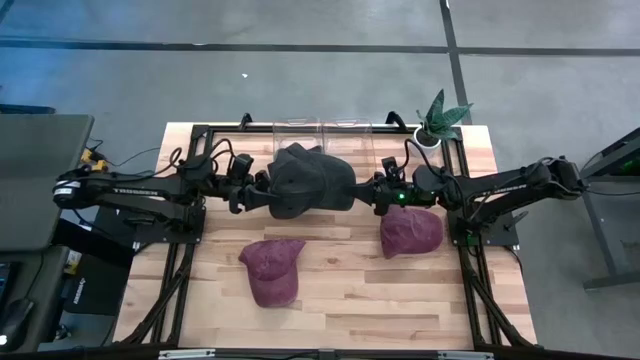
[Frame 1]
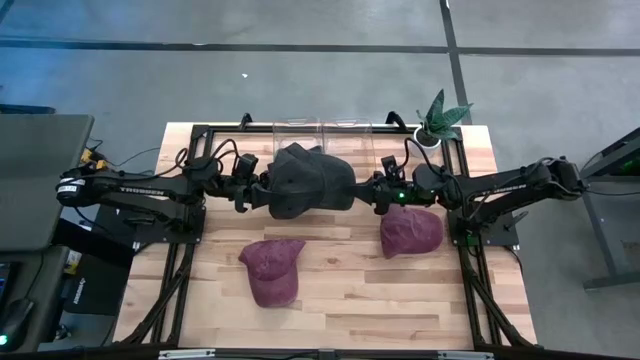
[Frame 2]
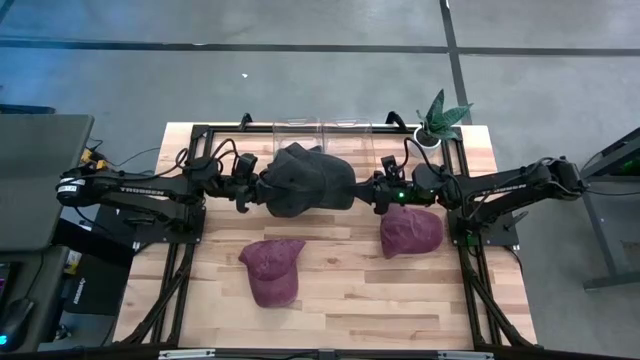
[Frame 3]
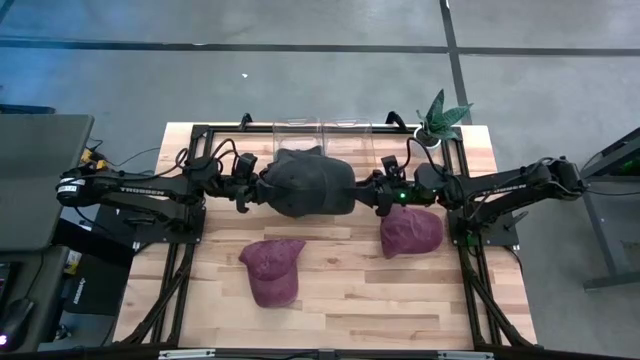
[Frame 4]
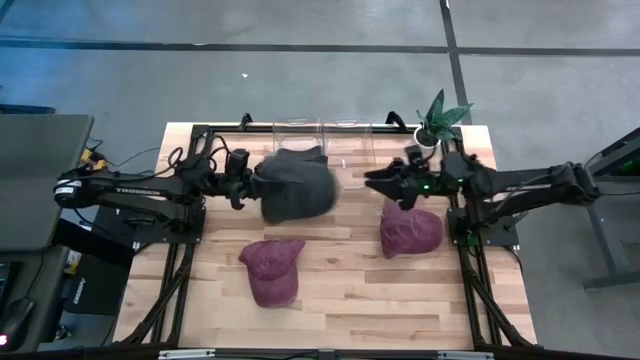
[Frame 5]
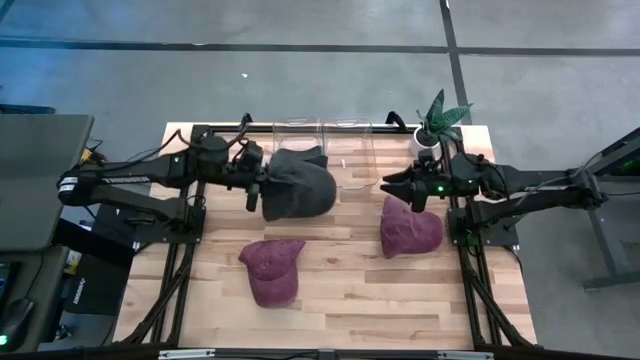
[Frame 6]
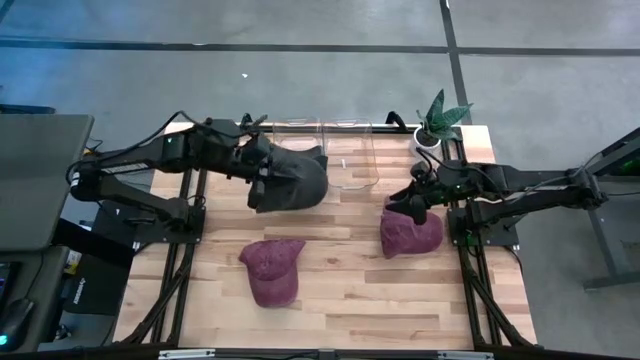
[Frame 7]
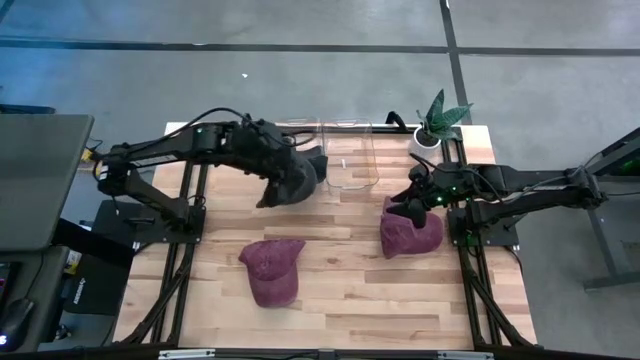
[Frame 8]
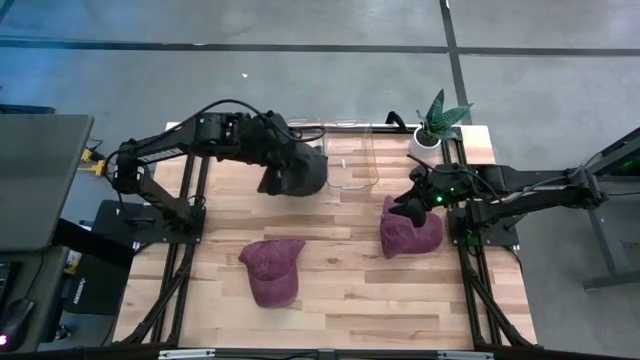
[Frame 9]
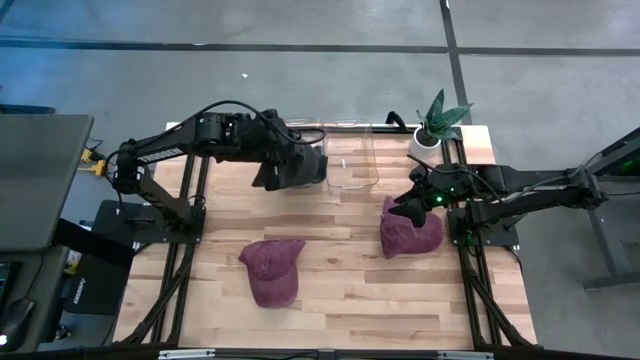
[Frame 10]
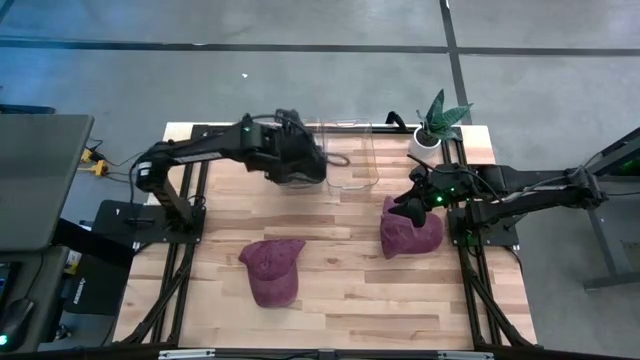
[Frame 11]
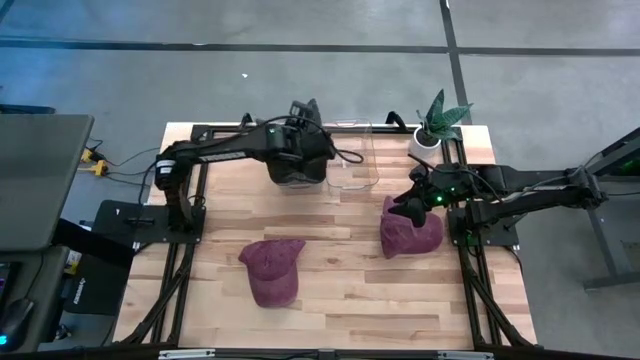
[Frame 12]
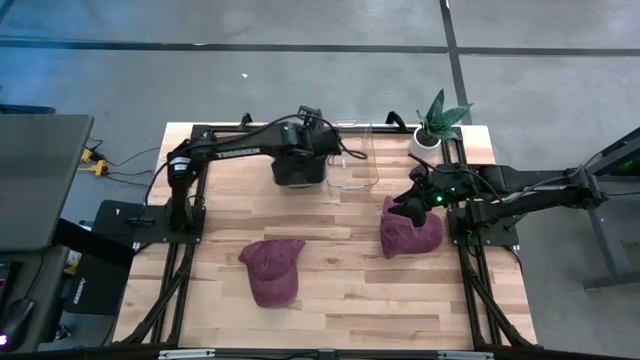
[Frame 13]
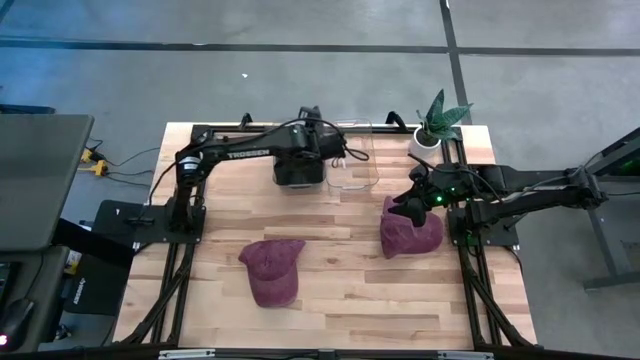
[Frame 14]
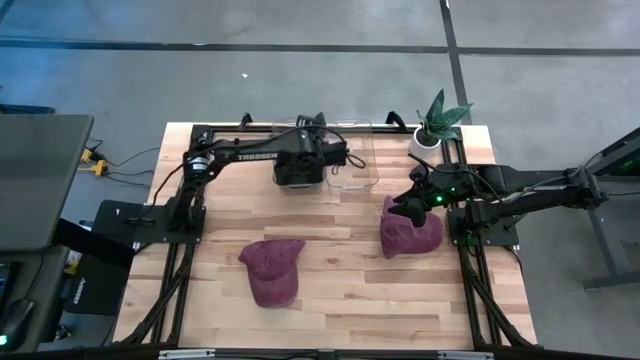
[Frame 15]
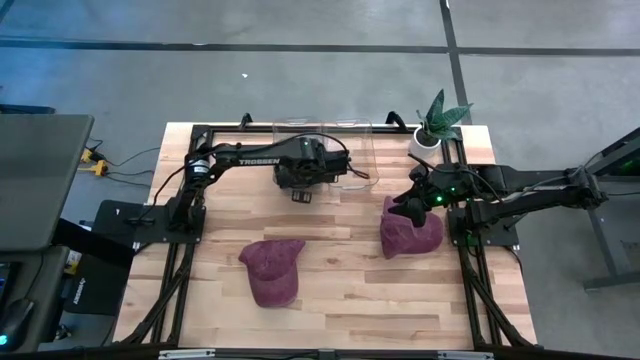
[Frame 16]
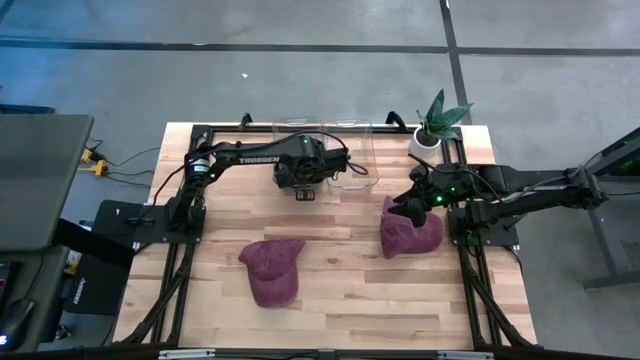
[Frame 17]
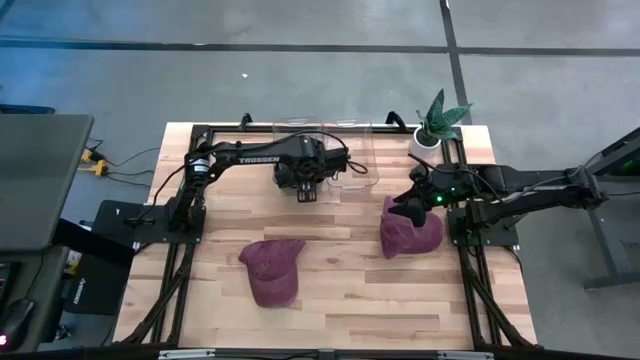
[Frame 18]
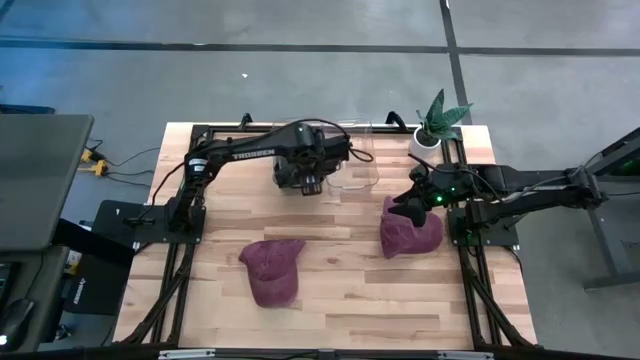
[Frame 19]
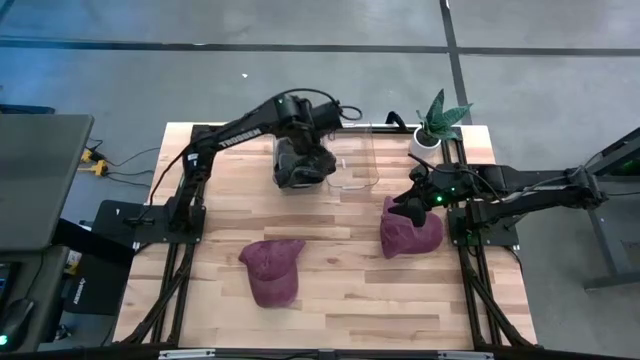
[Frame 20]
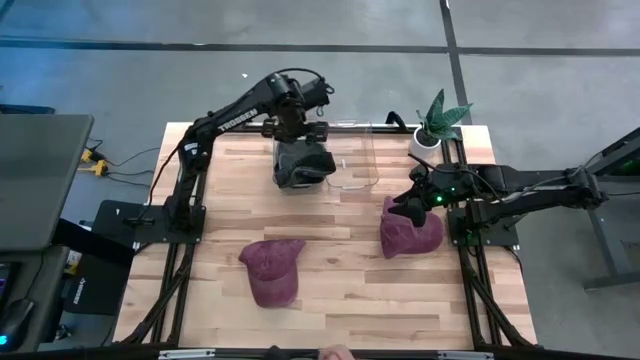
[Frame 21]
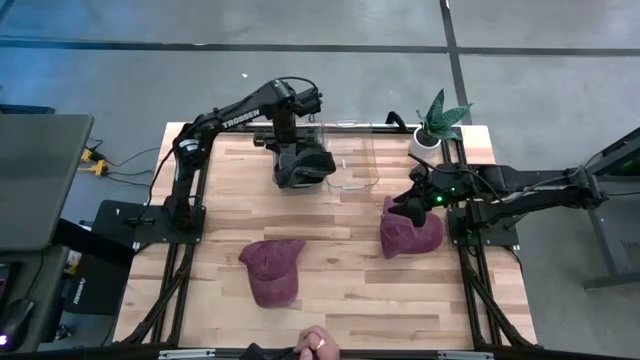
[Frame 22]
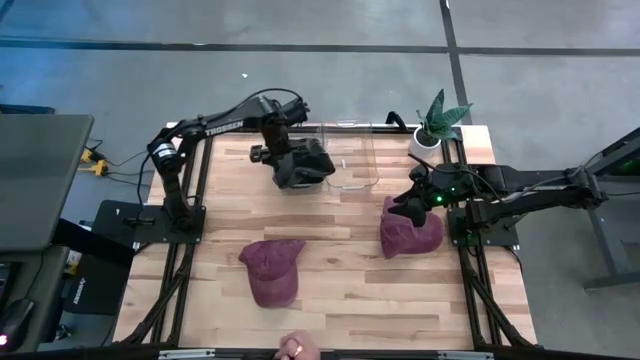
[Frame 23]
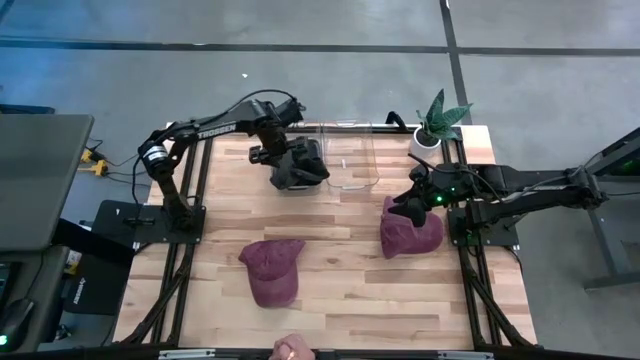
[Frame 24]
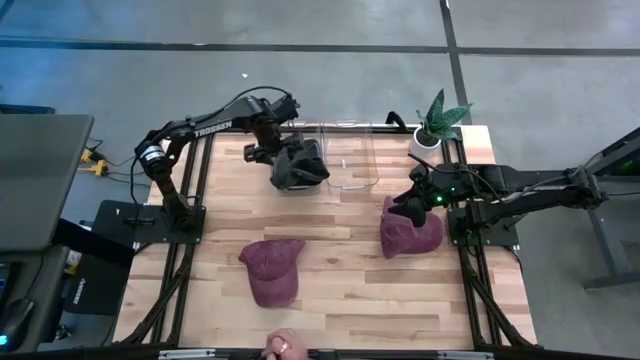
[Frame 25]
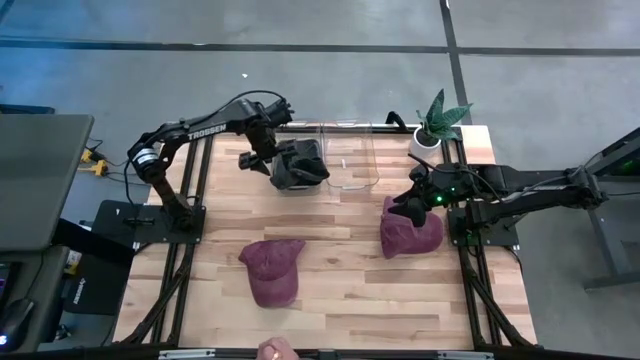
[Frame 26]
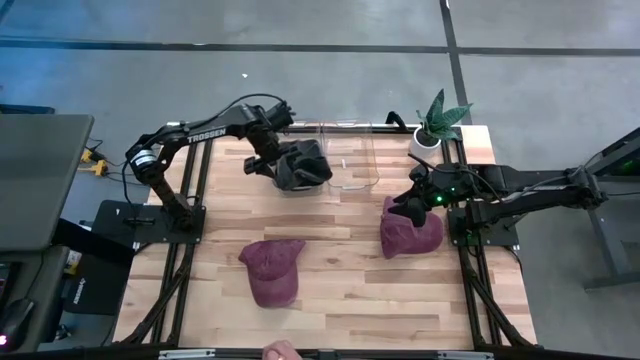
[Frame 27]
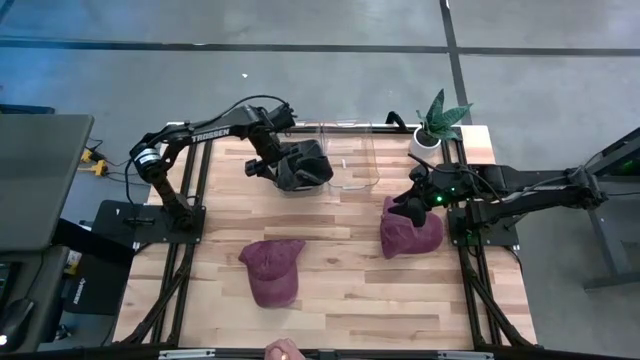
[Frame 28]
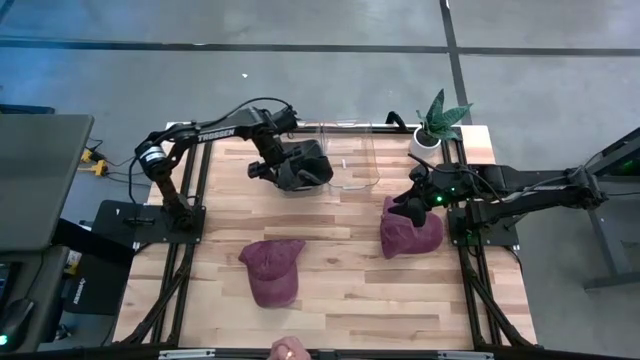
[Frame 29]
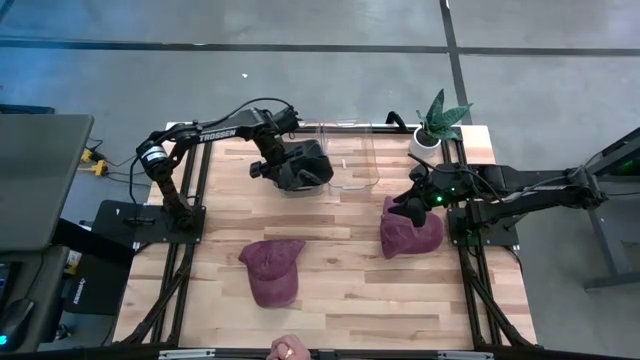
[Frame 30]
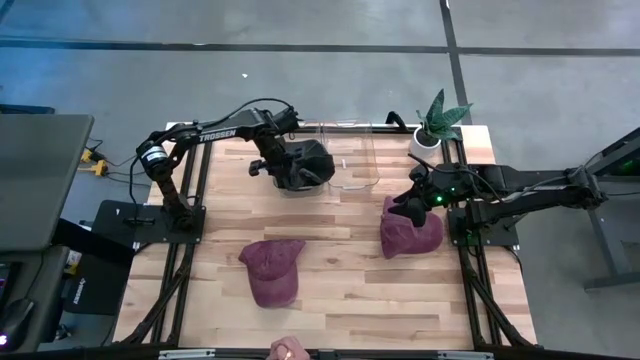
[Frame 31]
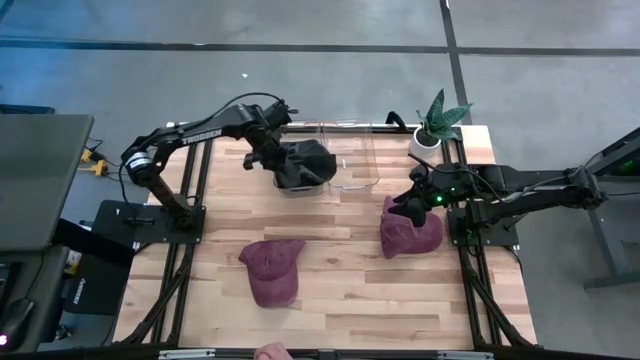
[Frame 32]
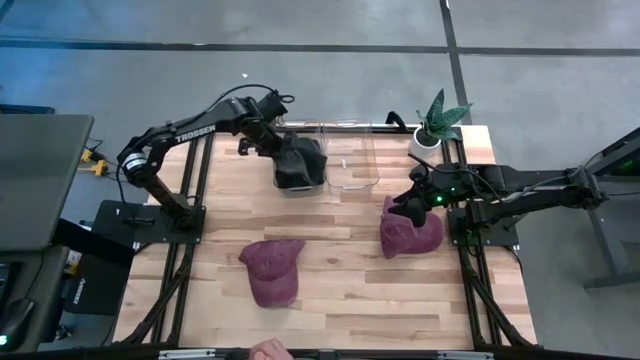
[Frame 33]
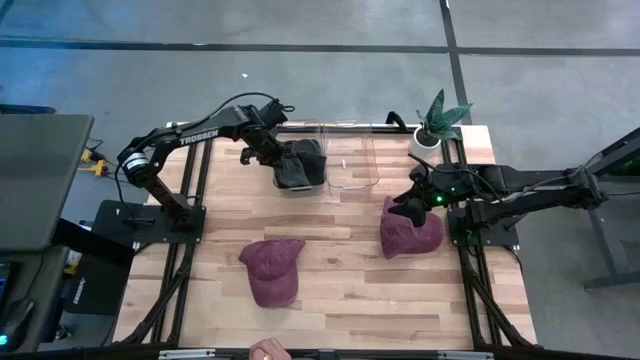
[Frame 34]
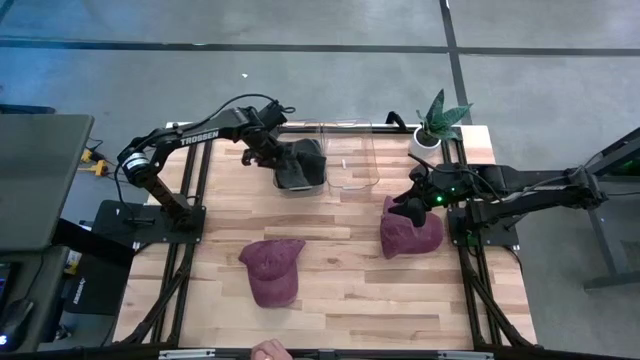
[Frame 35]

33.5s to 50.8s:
Task: Pick & Place hat
Put the black cap into the left transparent bin

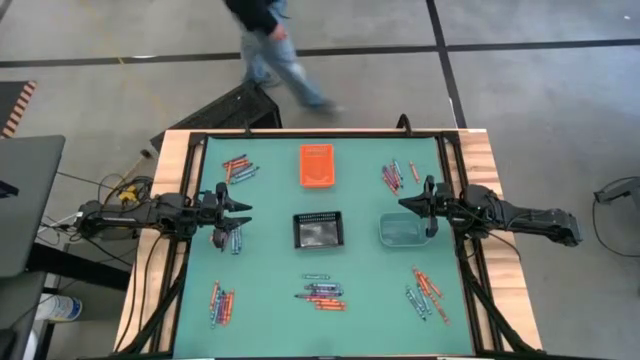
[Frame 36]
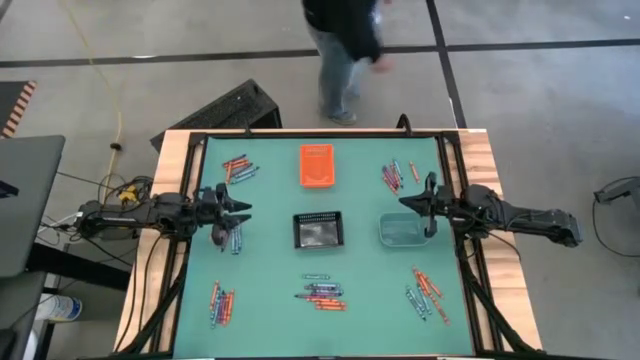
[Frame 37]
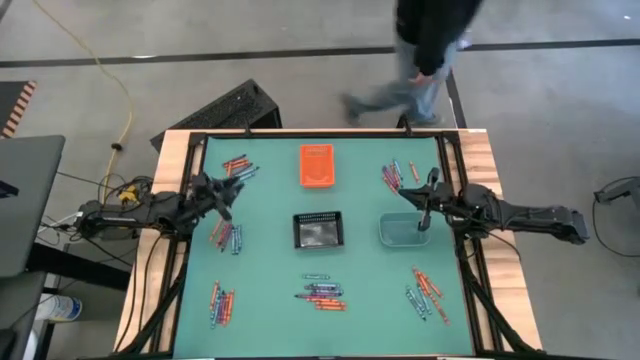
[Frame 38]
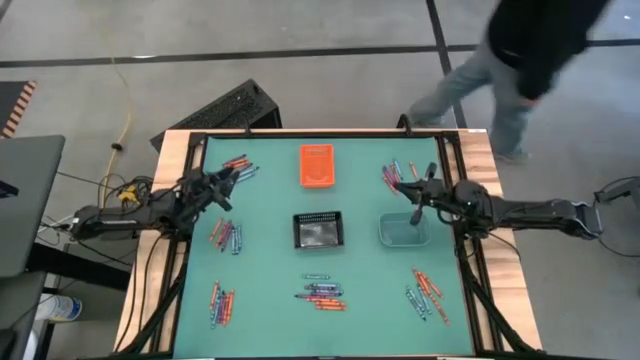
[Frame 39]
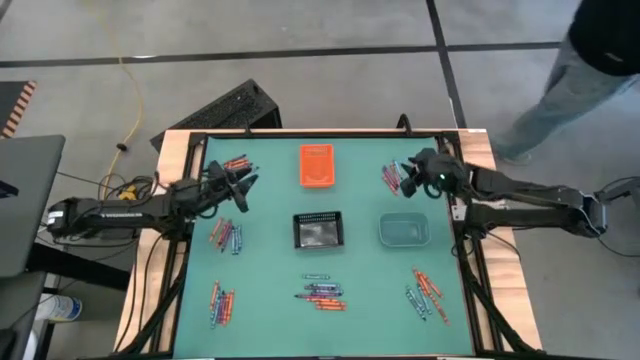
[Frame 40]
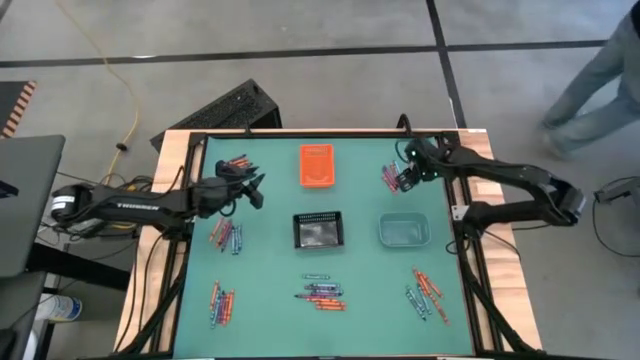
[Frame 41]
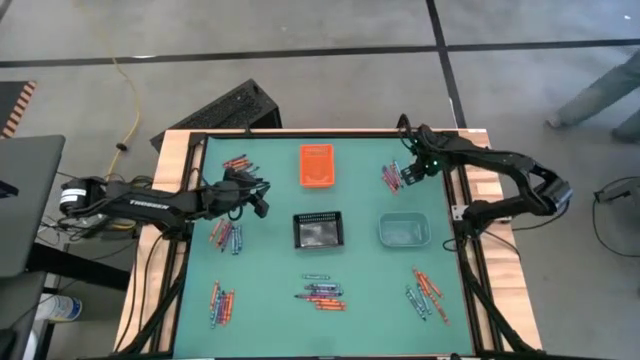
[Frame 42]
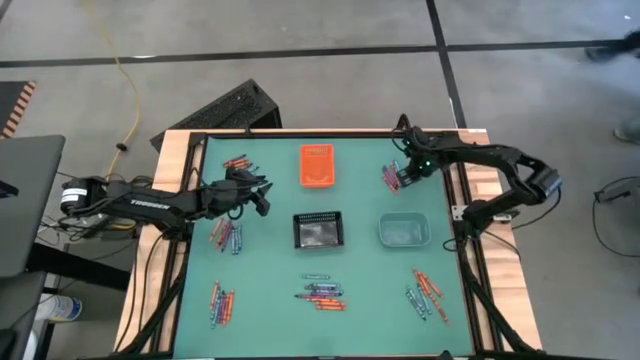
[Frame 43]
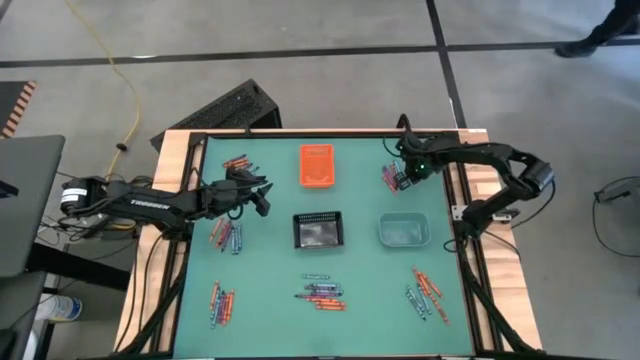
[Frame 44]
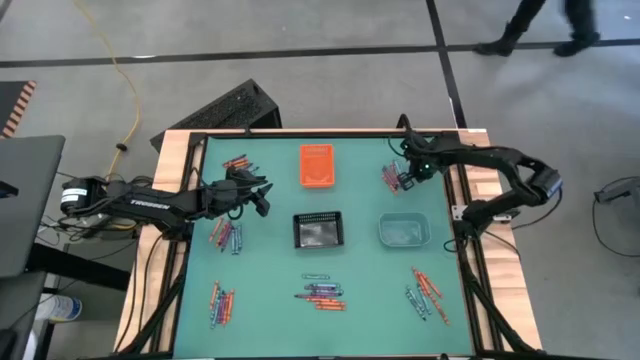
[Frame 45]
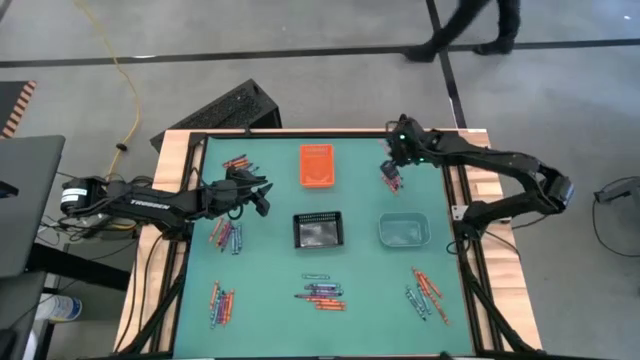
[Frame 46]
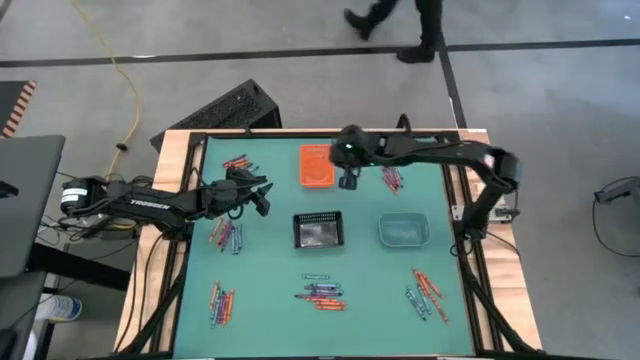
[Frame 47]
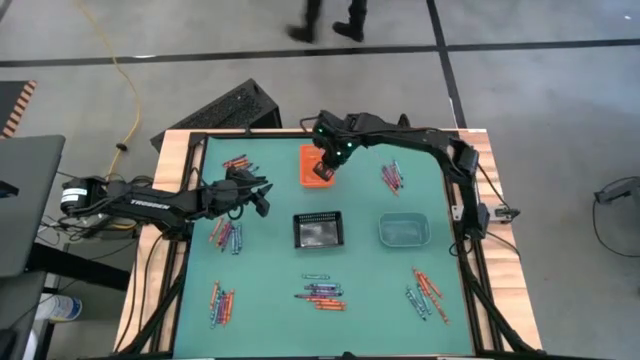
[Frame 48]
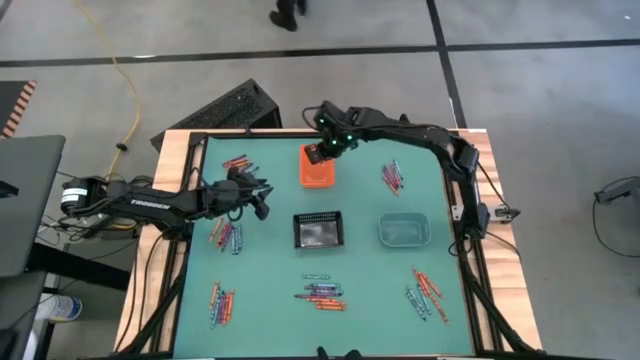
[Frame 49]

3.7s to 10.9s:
Task: Sort crayons
Put the orange crayon into the orange bin
